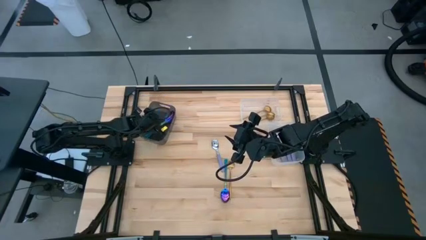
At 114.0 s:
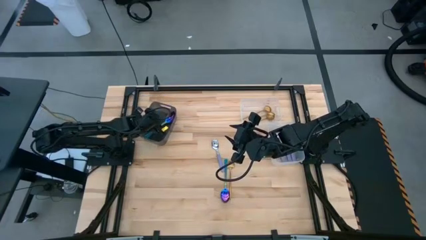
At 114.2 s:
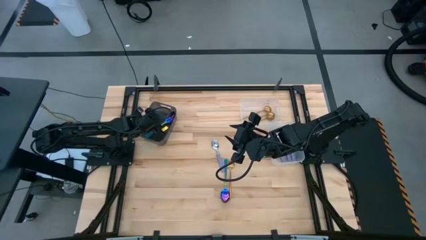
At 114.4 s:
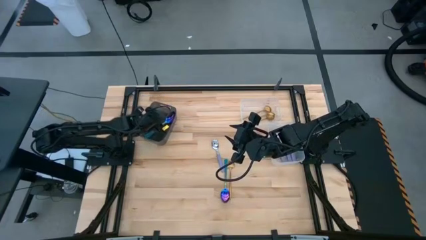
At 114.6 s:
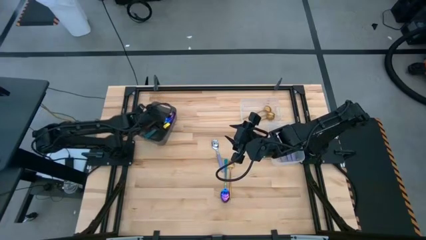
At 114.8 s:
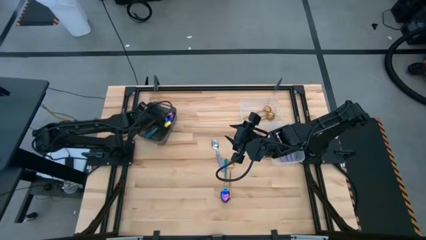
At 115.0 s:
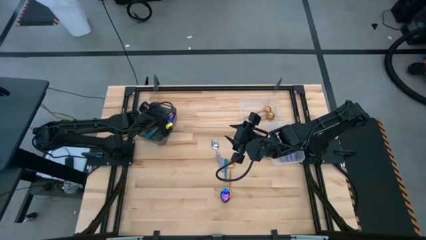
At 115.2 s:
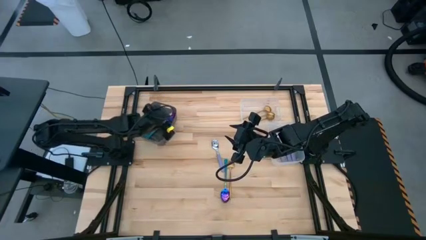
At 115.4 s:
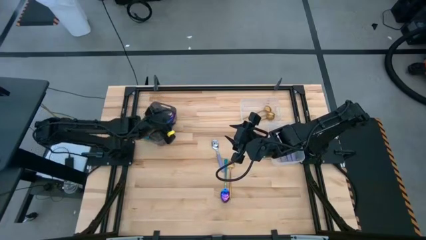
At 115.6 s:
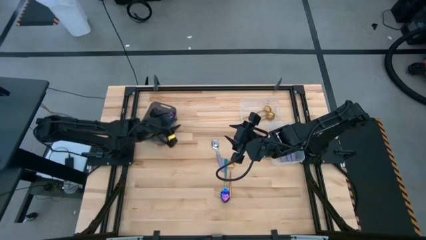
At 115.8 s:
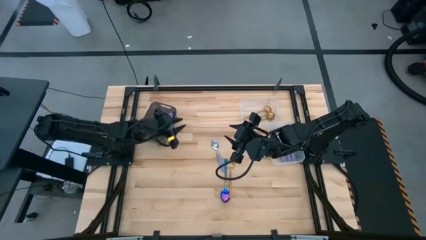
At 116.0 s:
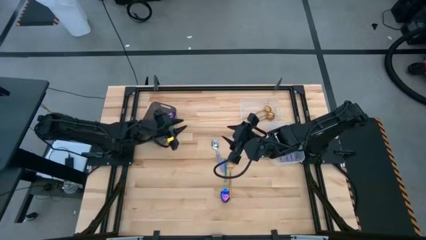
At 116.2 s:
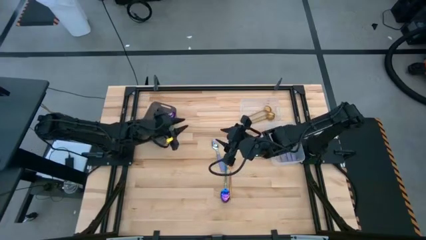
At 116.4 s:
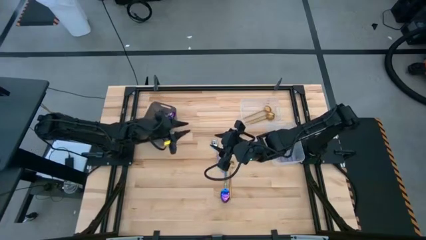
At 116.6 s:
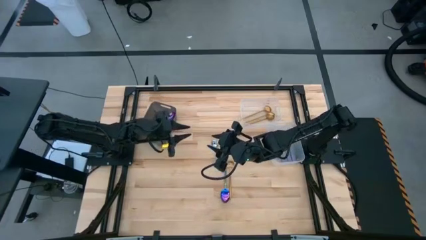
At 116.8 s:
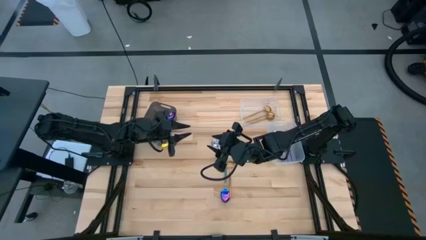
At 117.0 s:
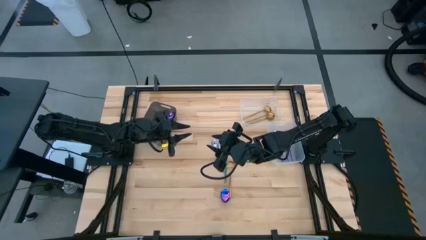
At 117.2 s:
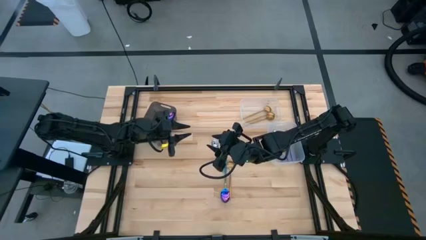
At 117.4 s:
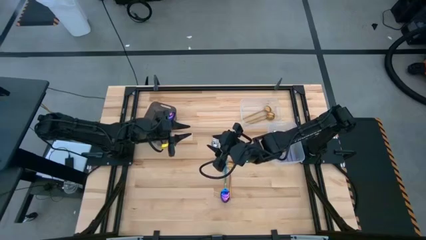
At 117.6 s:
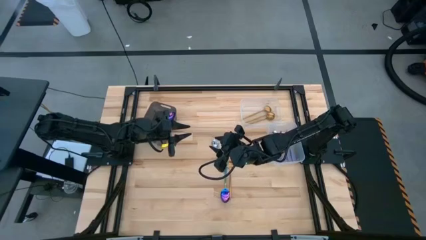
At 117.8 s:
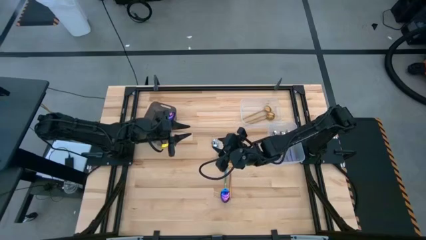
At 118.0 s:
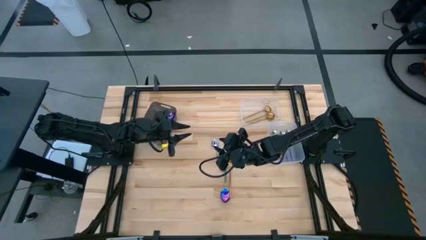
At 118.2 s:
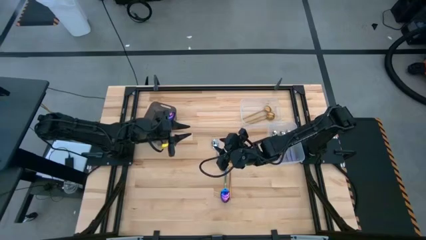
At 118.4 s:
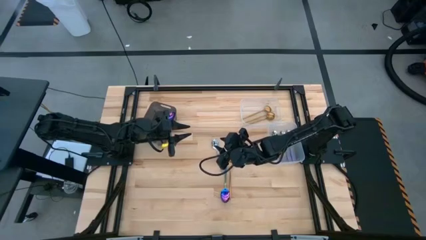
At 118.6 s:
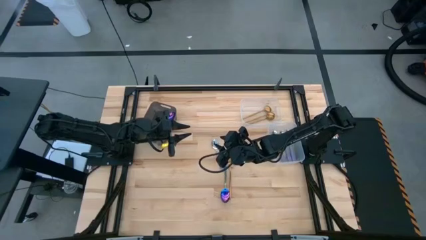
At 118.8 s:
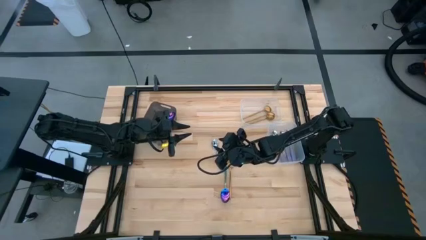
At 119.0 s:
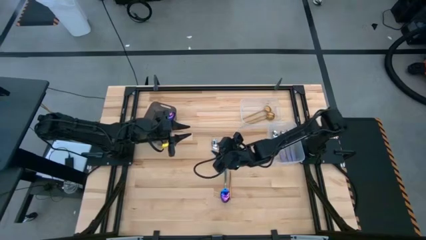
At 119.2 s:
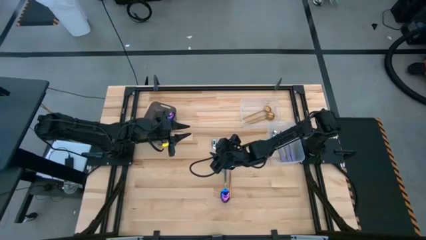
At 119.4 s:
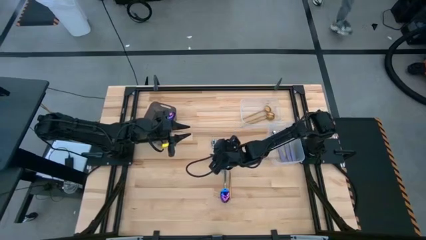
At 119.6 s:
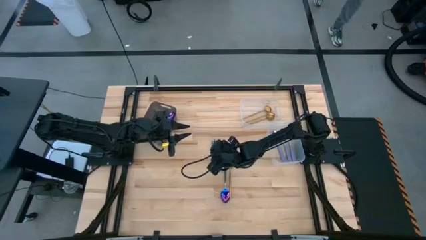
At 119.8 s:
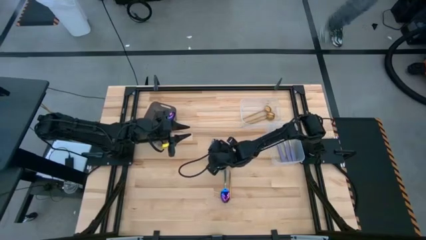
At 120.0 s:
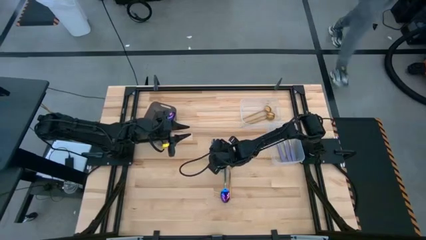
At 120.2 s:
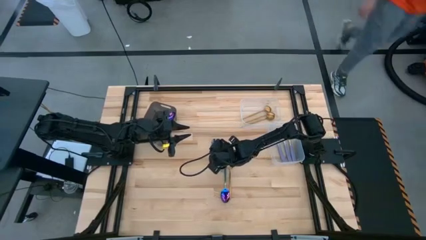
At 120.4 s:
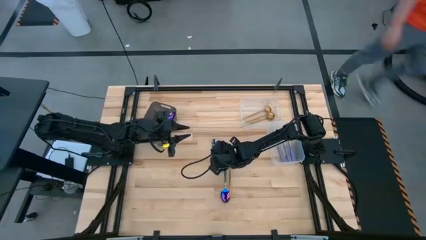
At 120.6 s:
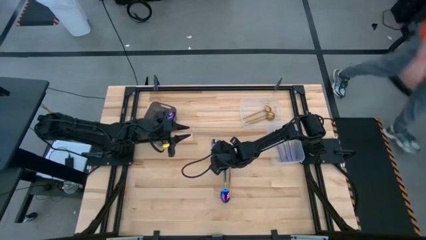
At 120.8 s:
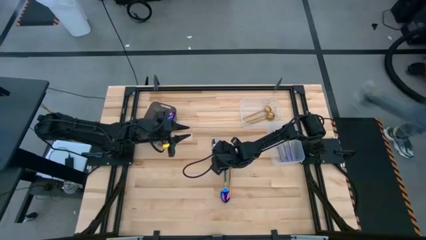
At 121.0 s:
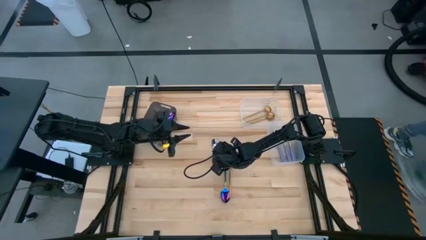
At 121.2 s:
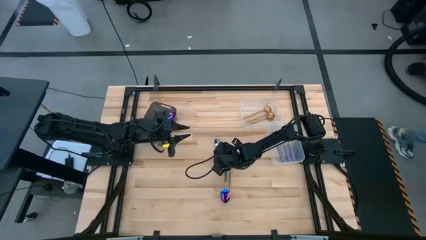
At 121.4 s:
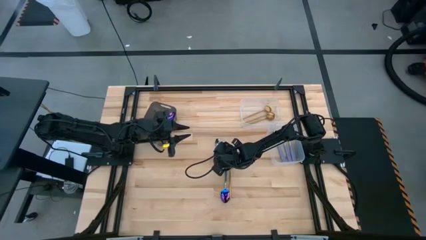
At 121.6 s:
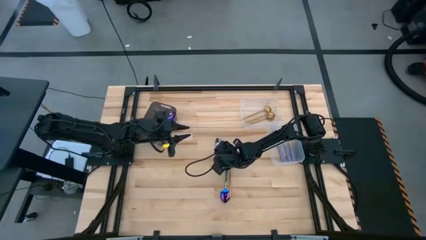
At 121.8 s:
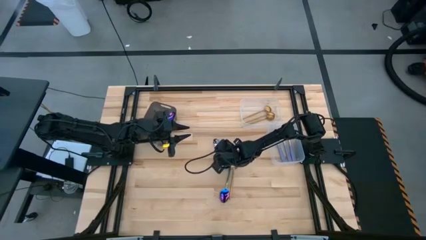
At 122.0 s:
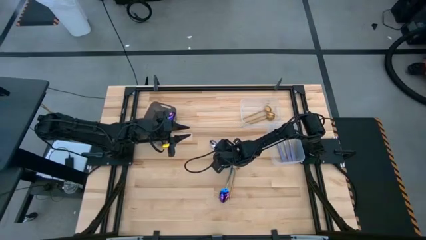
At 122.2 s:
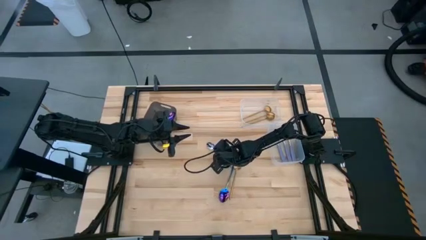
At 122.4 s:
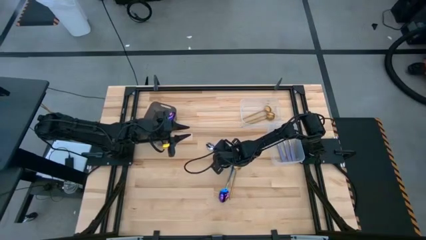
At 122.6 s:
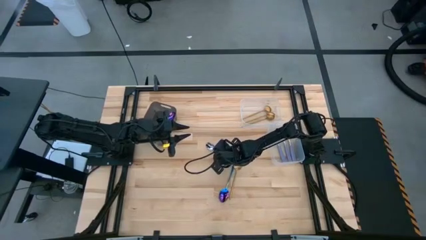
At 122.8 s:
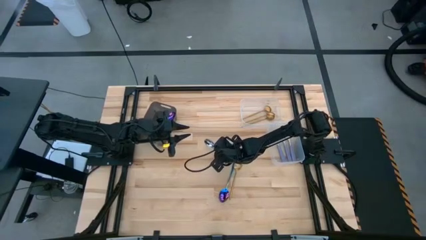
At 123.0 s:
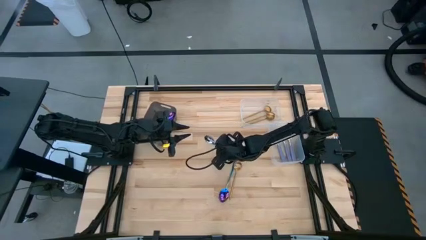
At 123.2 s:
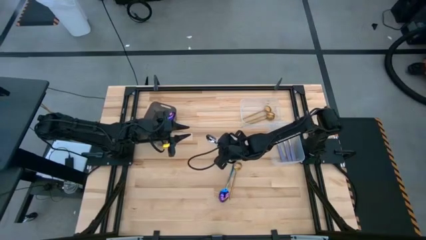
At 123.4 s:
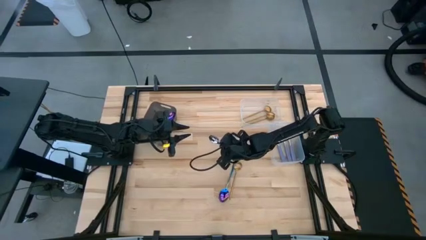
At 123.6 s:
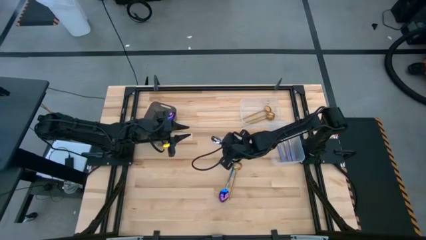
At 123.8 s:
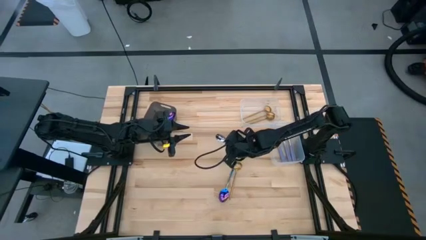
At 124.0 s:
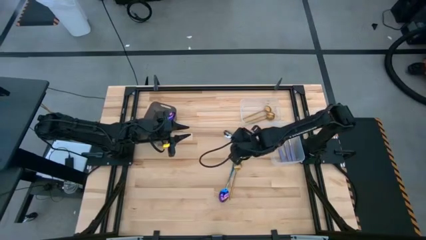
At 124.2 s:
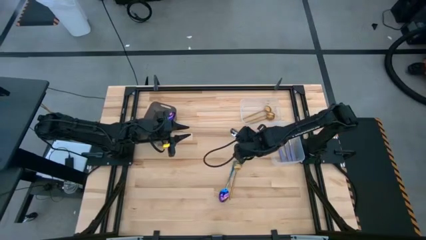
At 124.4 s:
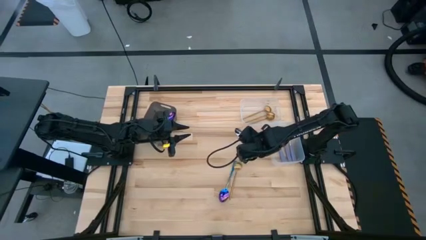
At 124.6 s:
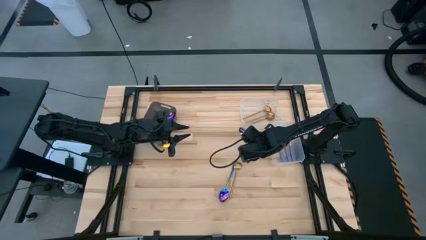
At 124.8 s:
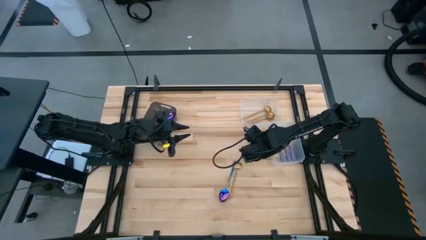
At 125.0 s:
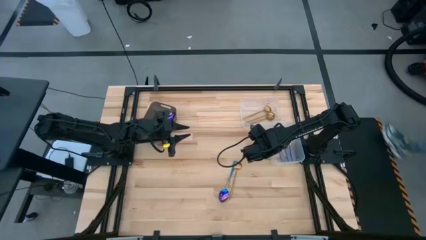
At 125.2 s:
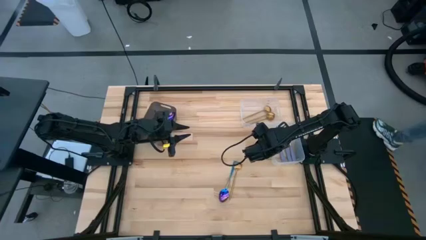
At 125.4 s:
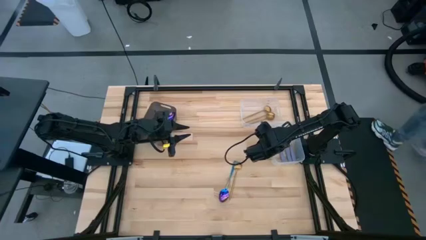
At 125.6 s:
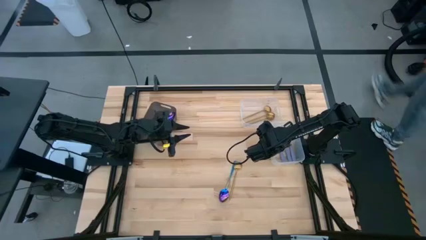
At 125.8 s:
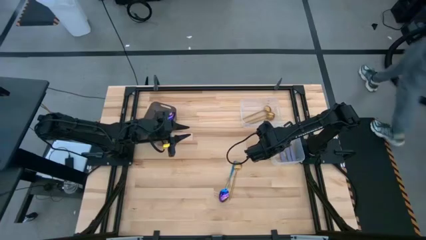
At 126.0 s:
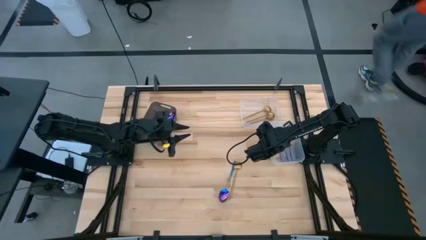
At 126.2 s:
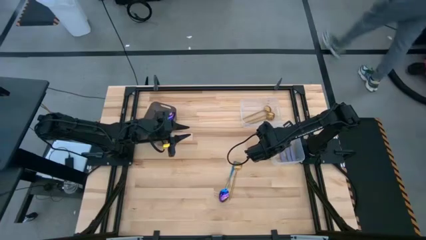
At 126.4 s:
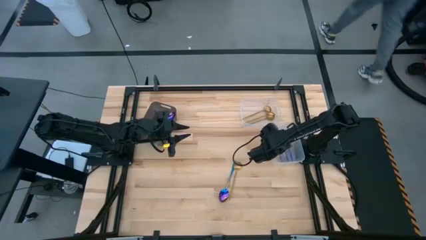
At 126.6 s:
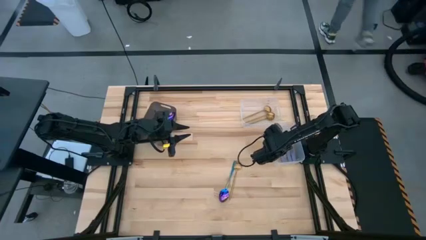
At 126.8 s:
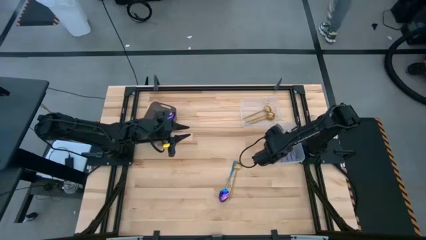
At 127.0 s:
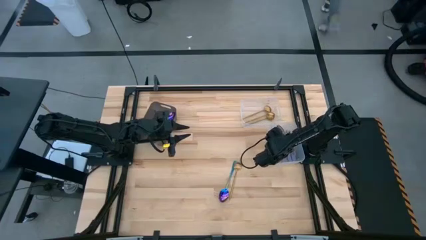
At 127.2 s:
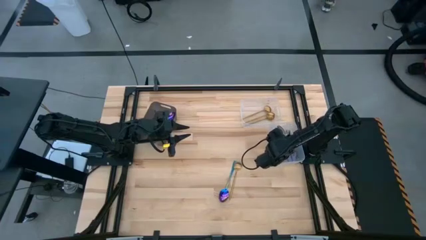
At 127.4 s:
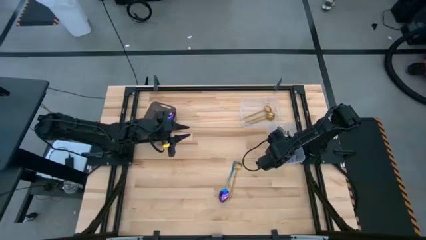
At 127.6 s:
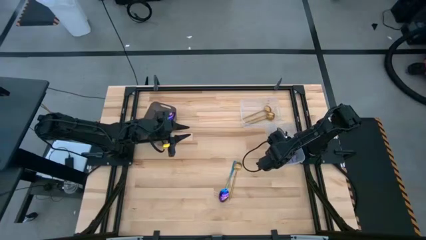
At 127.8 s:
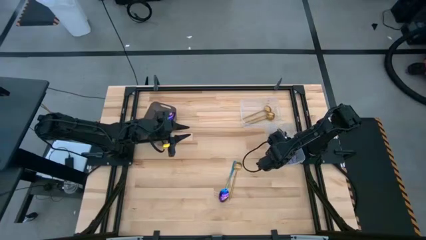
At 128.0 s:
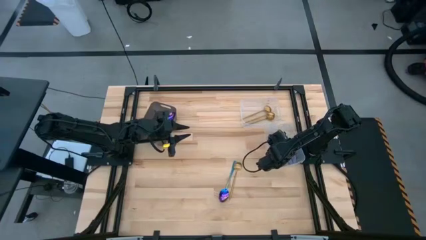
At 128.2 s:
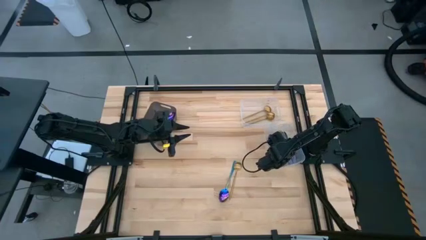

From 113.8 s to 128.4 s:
Task: Sort silverware by color (type)
Put the purple spoon into the bottom transparent bin

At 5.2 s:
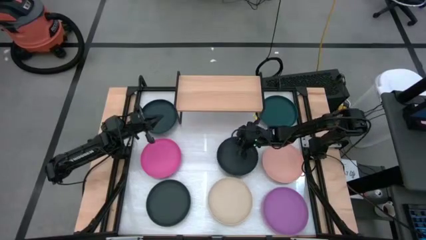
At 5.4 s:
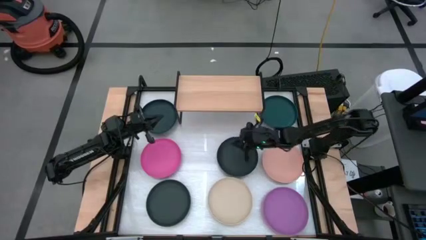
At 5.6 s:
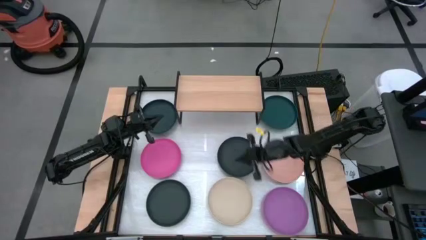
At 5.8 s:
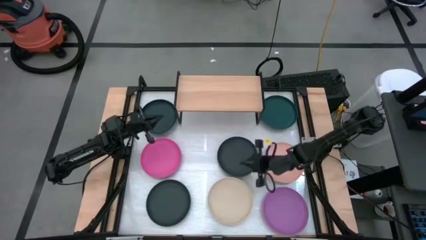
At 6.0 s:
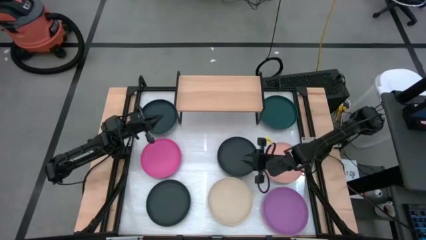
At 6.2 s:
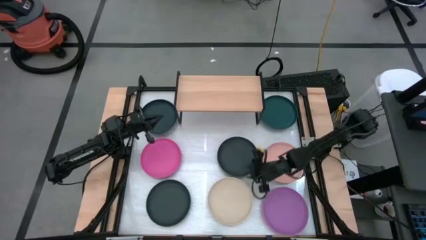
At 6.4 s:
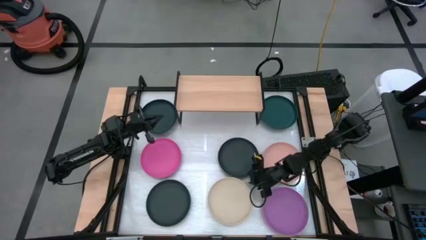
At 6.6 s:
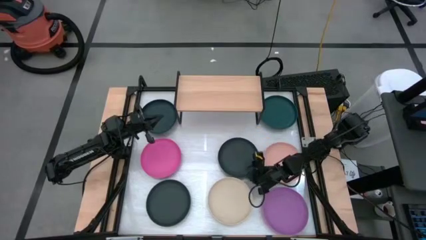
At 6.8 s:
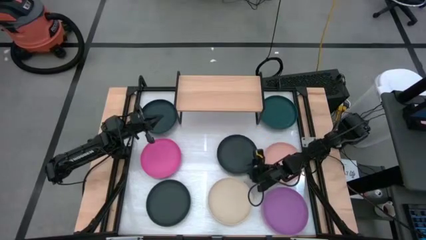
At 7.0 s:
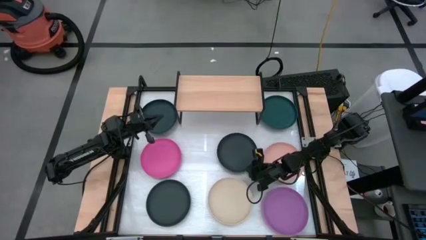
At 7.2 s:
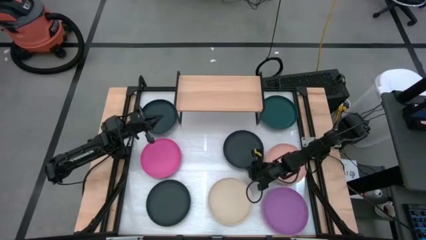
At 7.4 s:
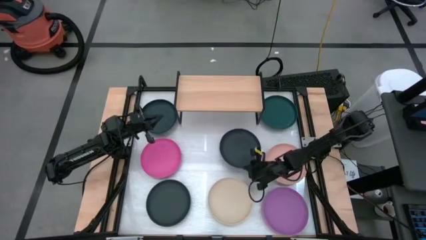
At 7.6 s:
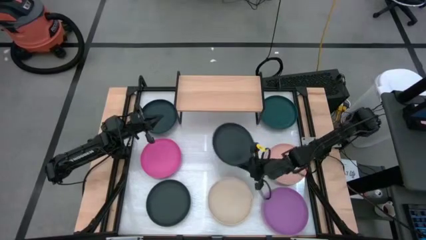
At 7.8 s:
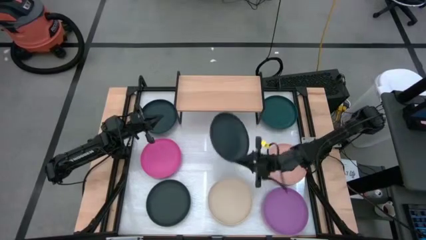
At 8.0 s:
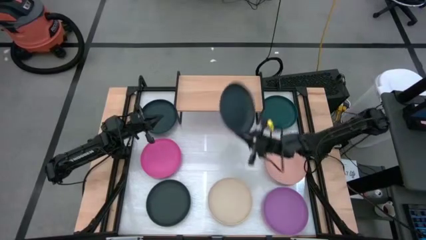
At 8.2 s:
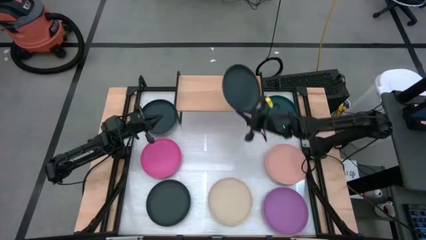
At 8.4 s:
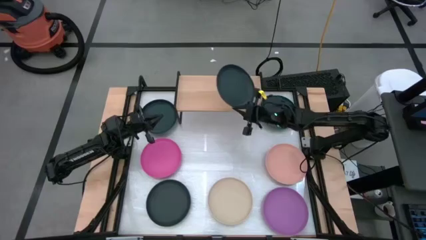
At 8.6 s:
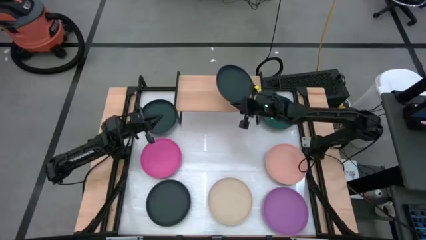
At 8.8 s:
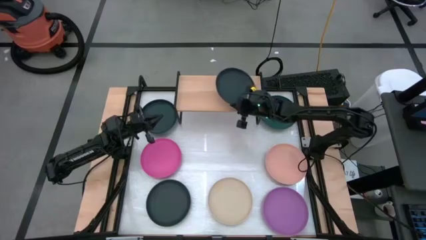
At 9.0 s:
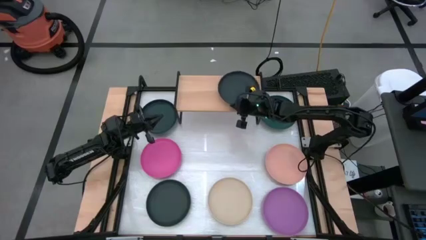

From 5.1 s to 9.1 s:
Task: Place and stack plates onto a shelf
Put the top black plate on the shelf
